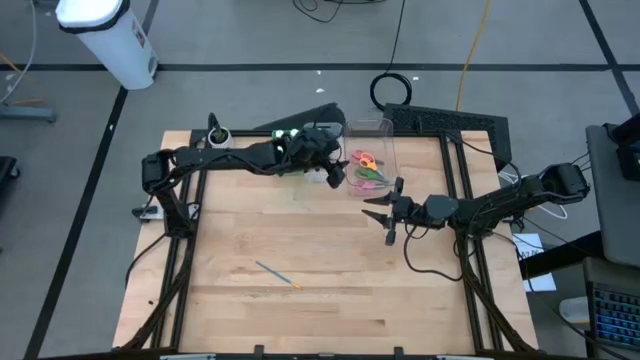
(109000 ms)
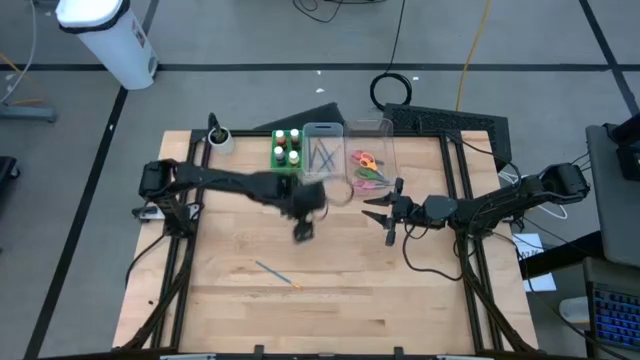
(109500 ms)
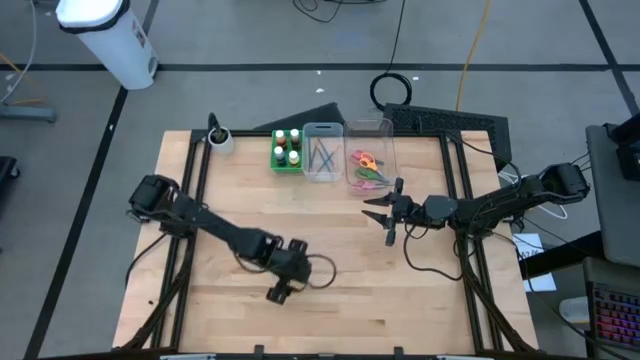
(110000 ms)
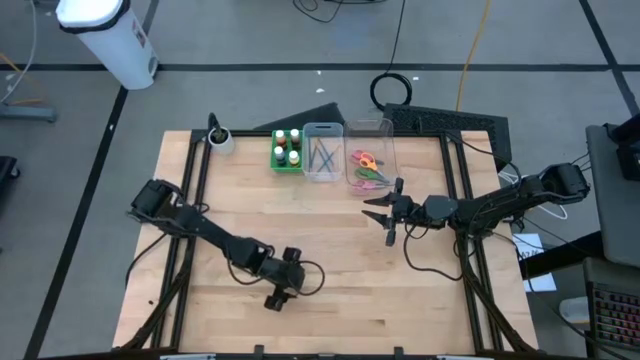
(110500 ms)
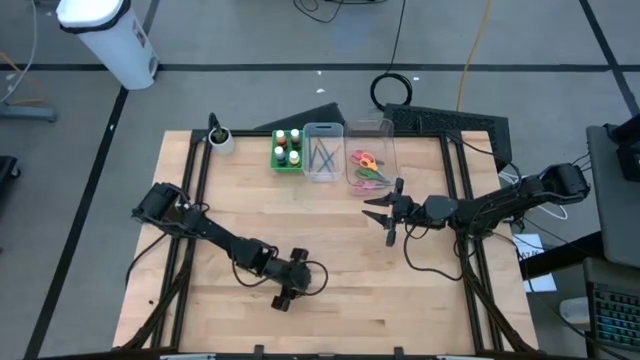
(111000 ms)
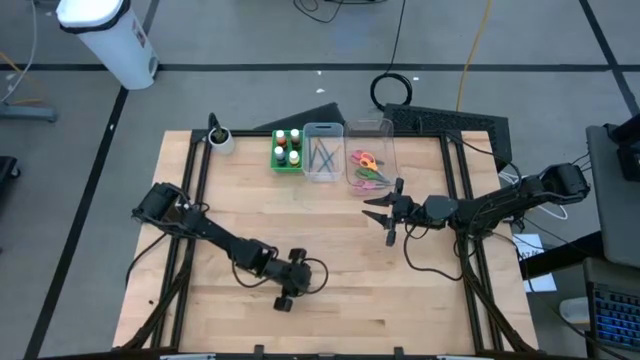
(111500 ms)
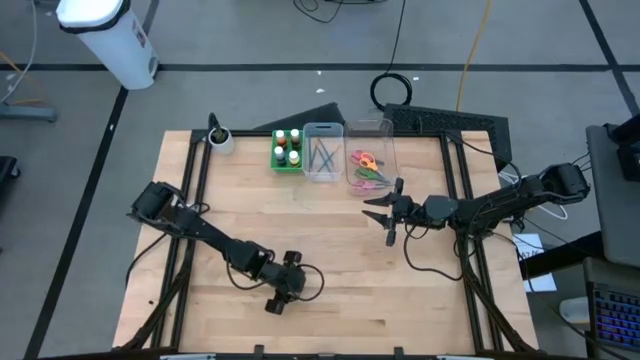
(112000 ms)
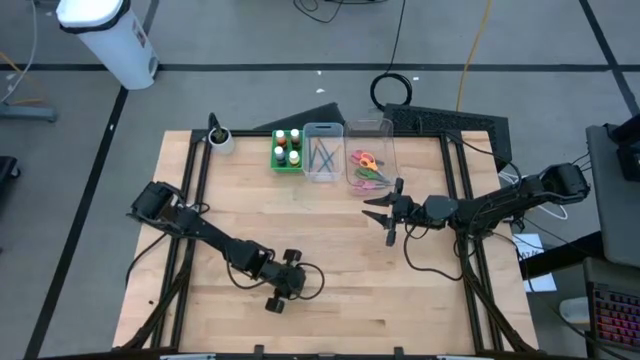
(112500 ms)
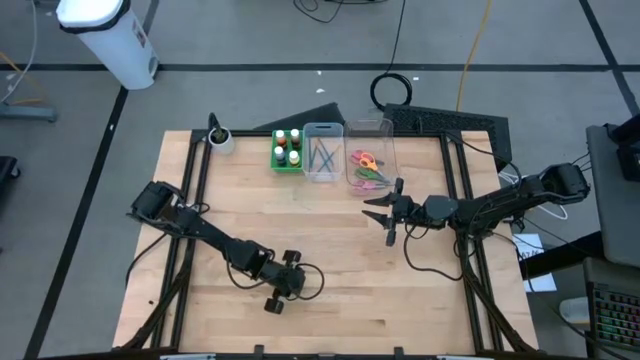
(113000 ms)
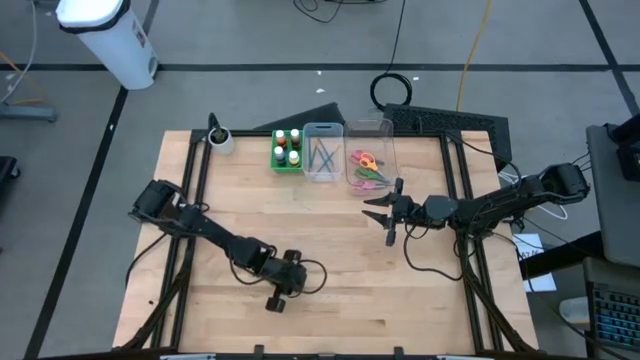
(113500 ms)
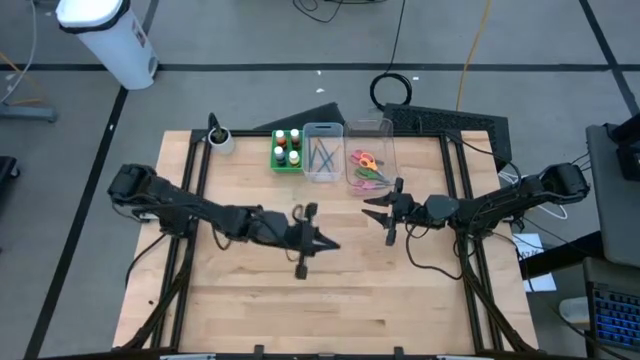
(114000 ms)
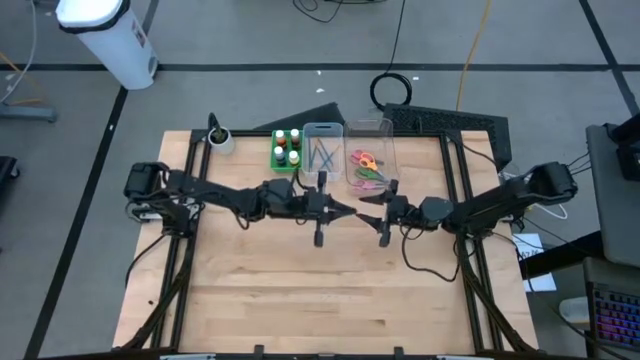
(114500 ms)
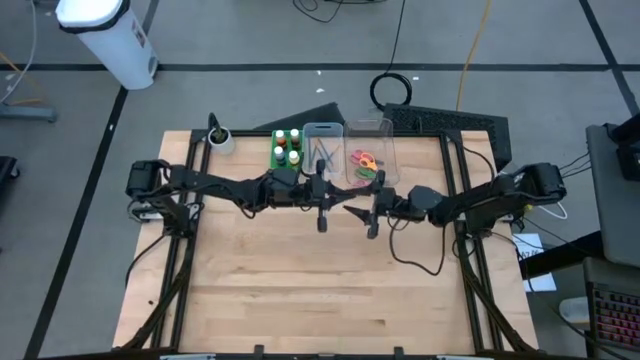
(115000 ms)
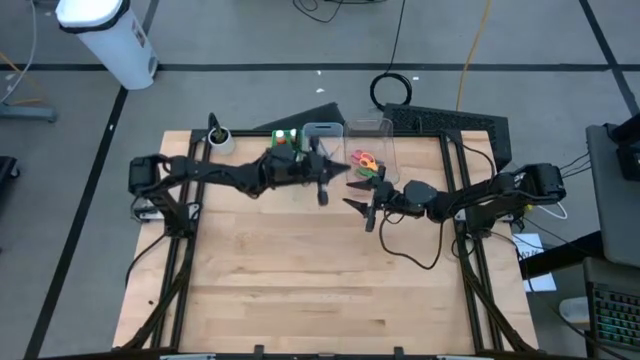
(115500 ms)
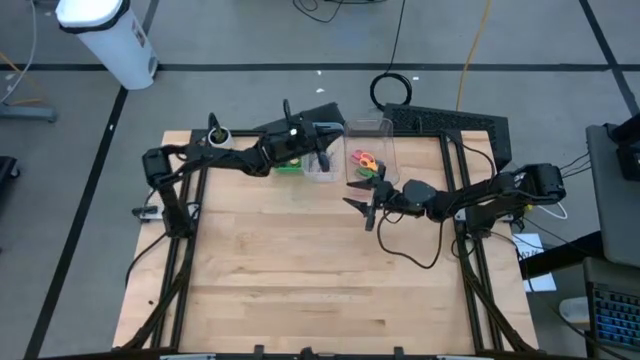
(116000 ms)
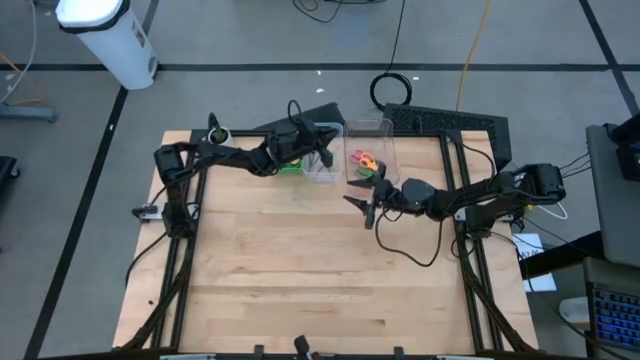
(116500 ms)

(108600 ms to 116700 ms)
Task: Pick & Place Paint Supplies
Put the blue paint brush into the white bin

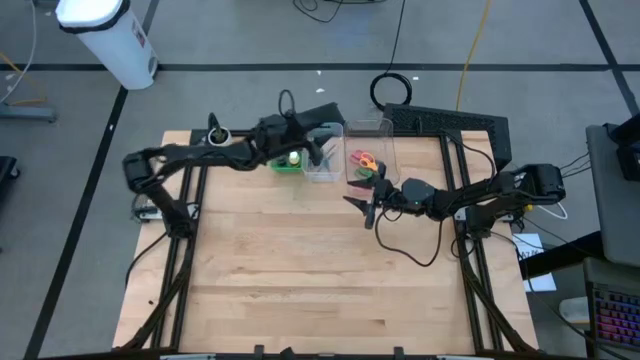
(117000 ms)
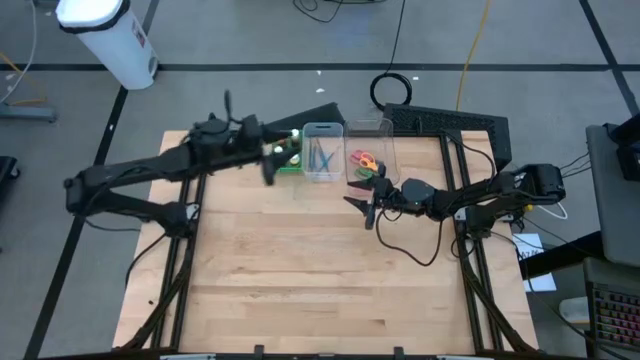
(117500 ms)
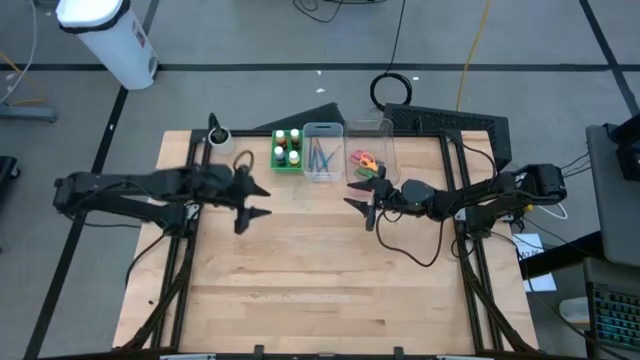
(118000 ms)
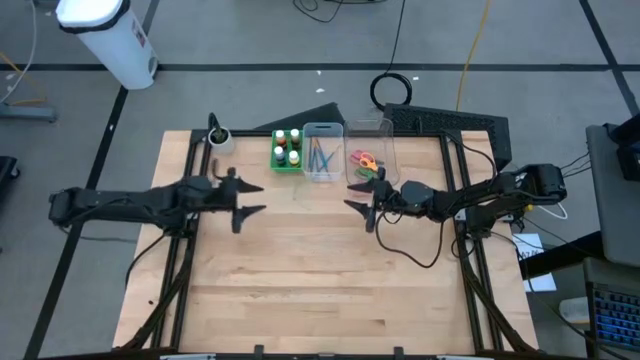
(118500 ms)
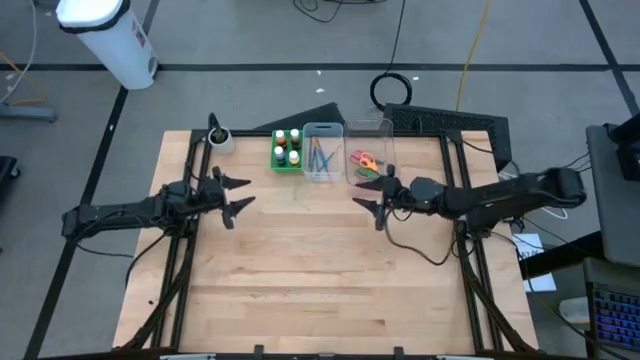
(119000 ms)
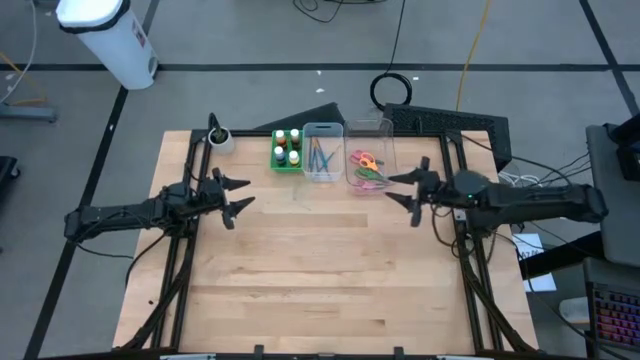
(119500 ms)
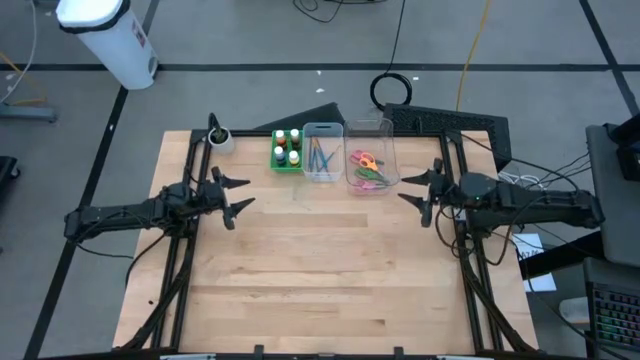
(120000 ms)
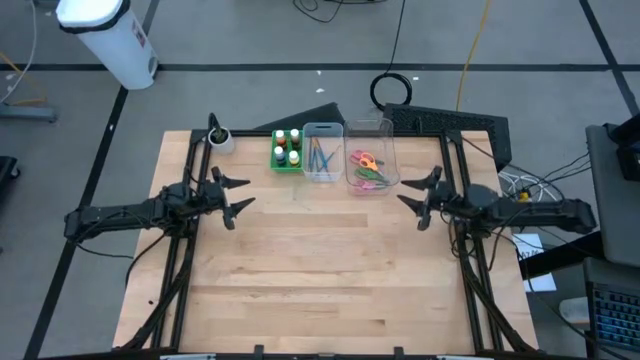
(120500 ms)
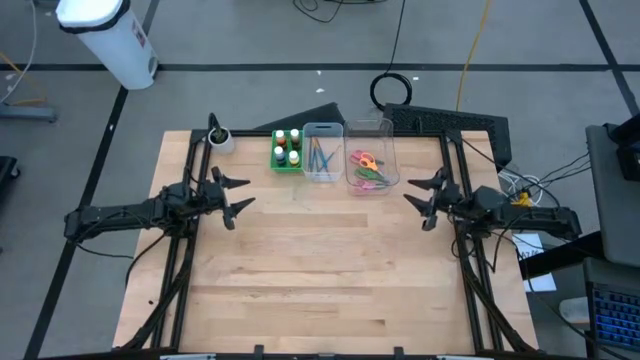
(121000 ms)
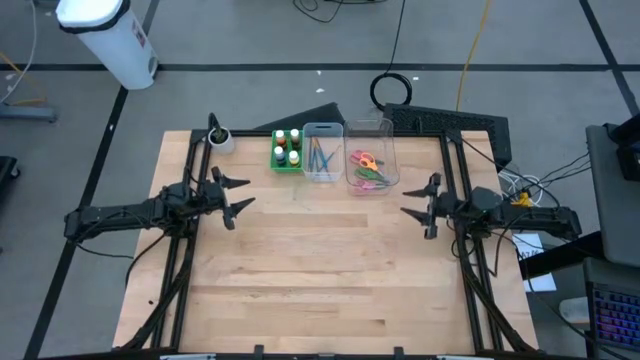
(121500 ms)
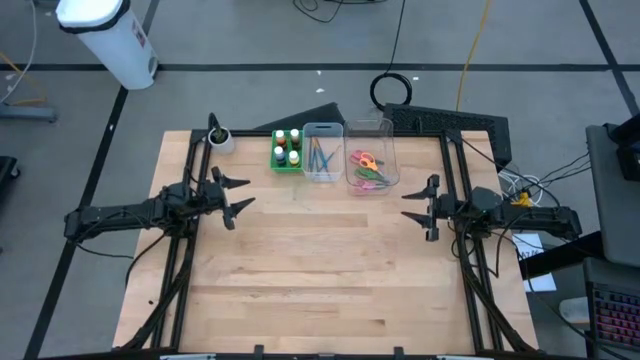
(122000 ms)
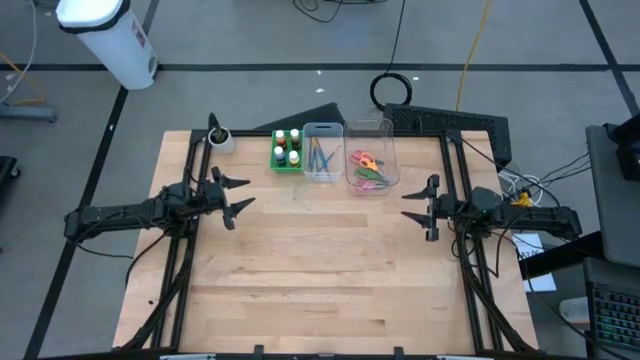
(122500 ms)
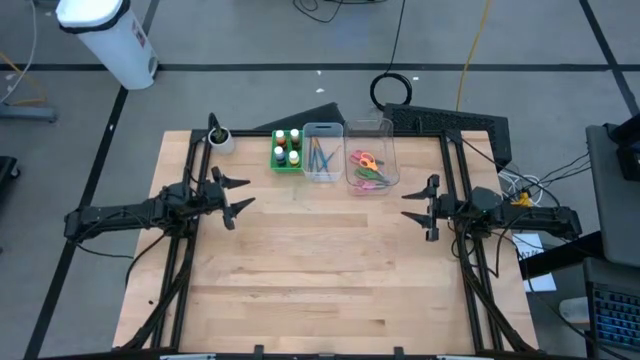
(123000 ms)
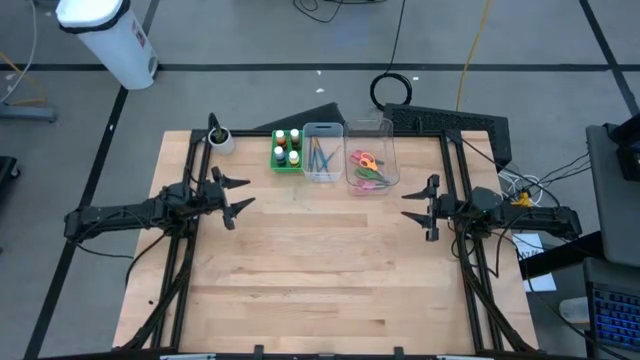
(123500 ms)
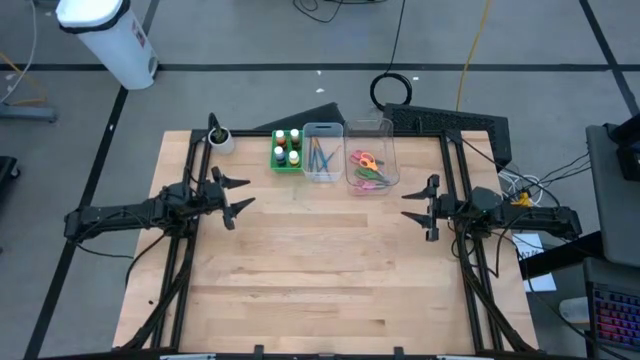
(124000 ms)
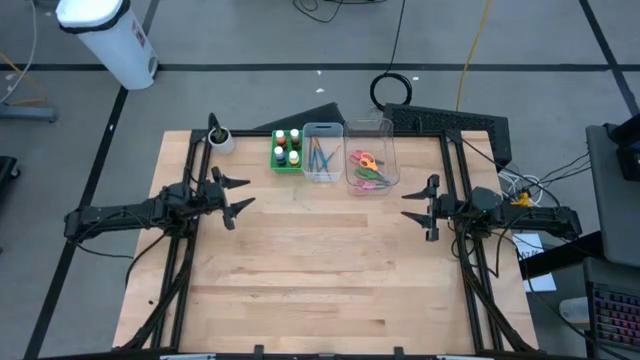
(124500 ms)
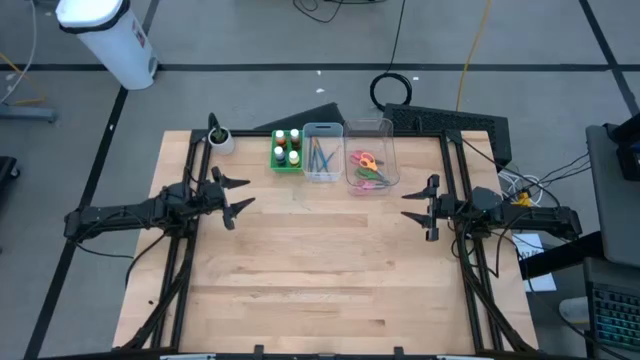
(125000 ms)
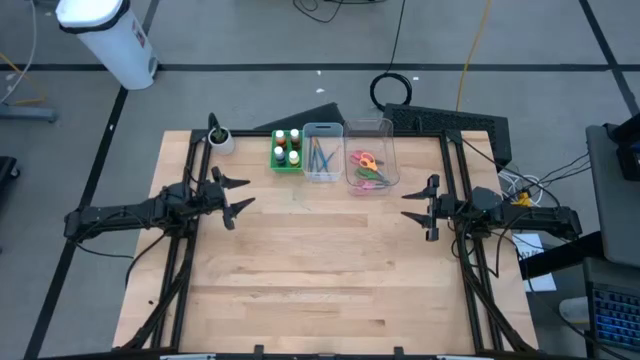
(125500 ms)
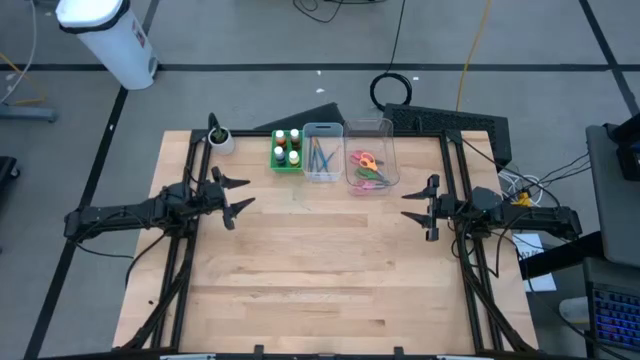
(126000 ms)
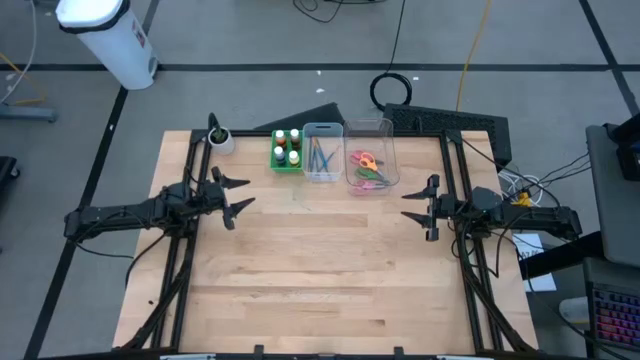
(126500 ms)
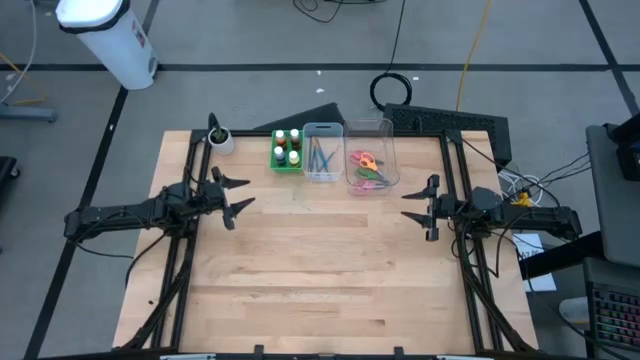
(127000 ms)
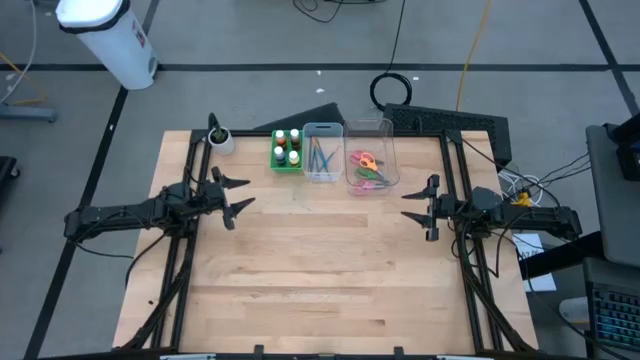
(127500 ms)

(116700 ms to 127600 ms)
Return to Home Position

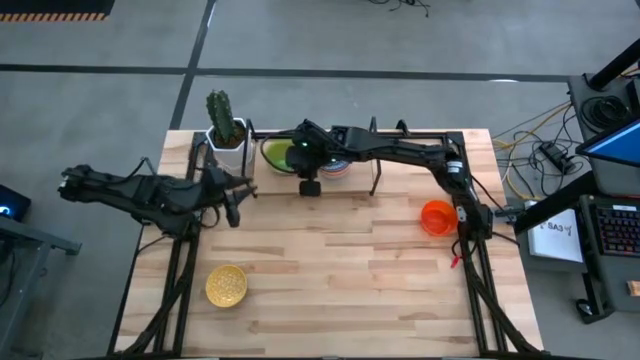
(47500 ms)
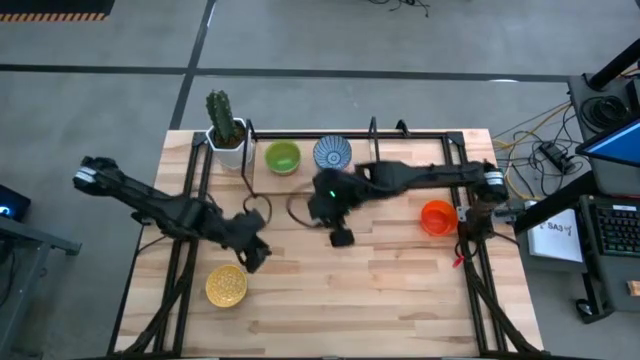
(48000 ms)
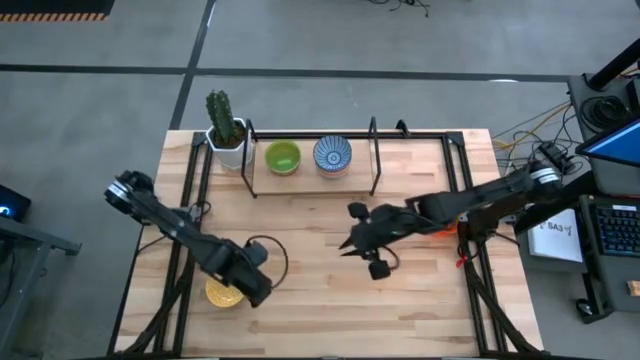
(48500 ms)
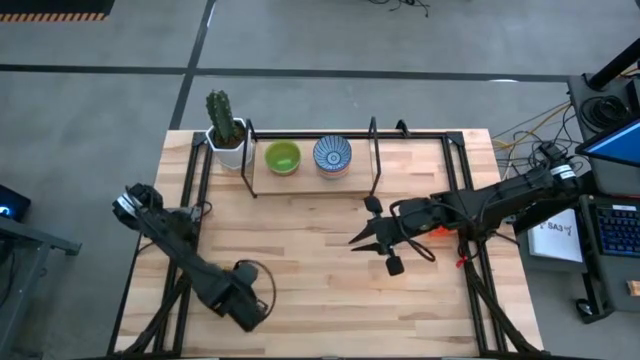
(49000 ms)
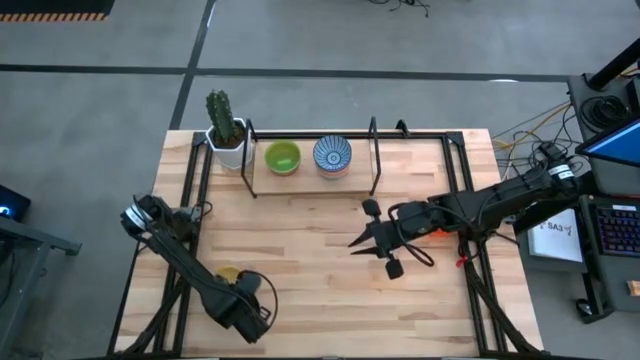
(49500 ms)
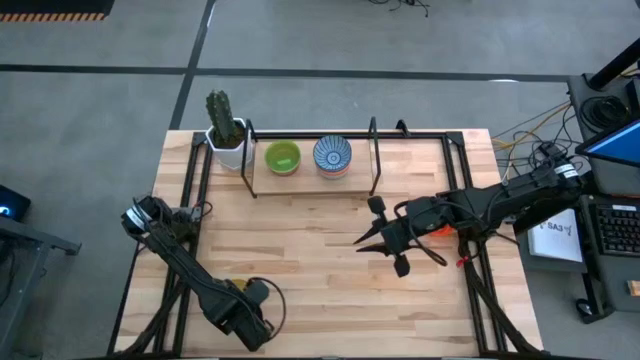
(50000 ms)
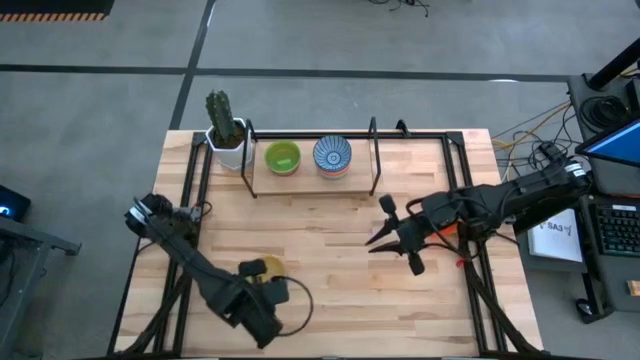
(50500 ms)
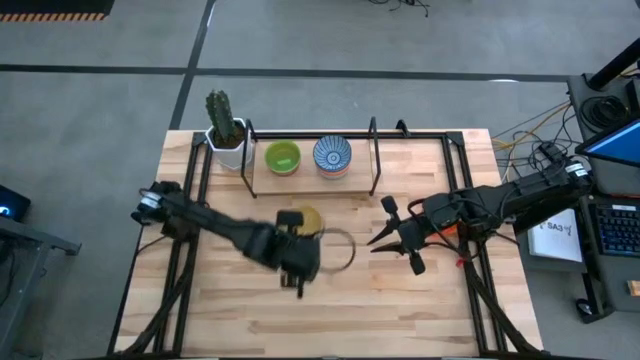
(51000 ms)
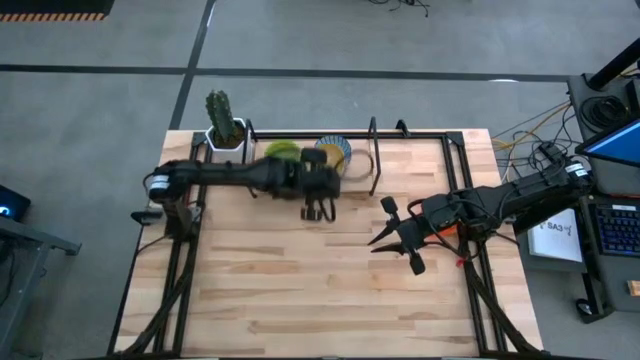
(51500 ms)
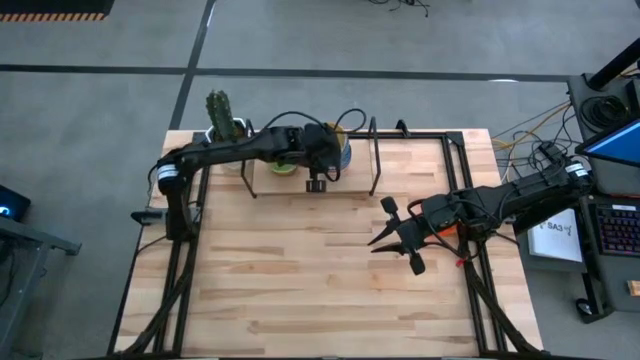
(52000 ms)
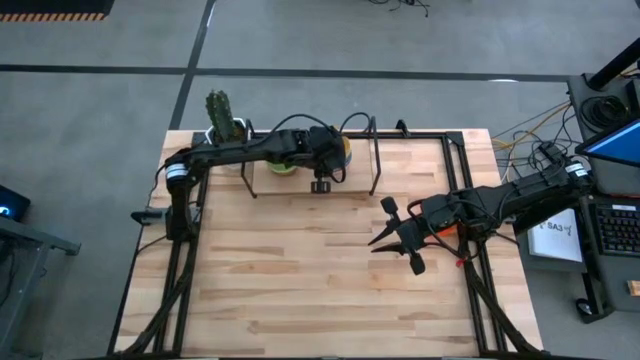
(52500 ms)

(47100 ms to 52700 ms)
Task: Place and stack bowls onto a shelf
Stack the blue-yellow patterned bowl on top of the red-blue patterned bowl on the shelf
